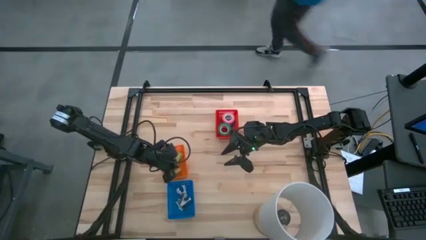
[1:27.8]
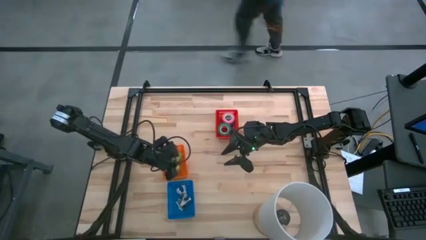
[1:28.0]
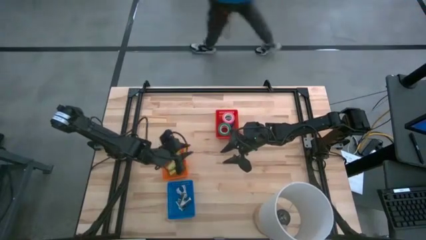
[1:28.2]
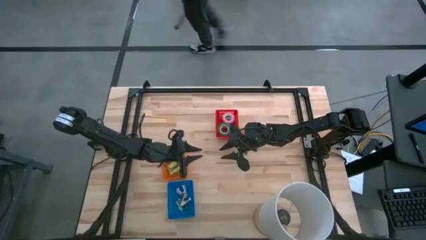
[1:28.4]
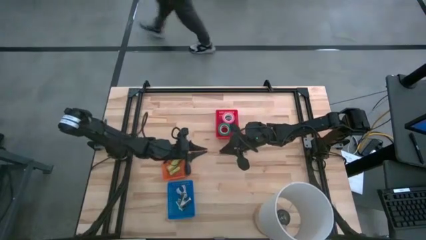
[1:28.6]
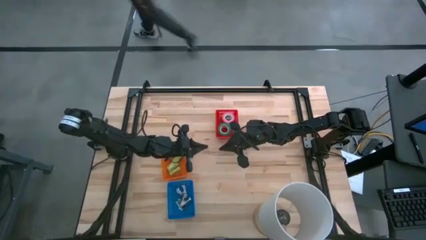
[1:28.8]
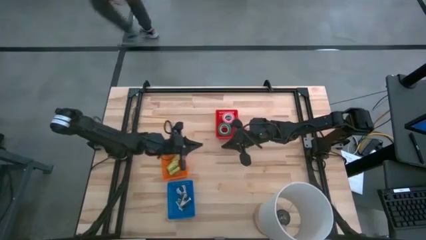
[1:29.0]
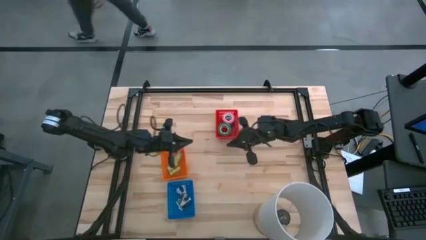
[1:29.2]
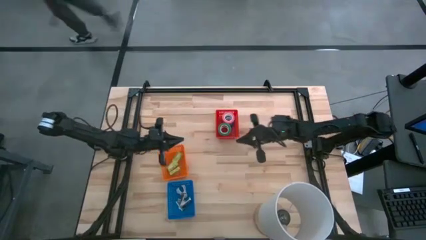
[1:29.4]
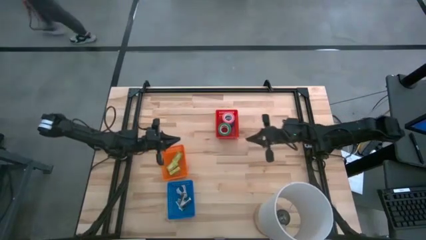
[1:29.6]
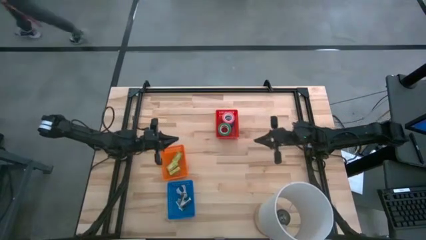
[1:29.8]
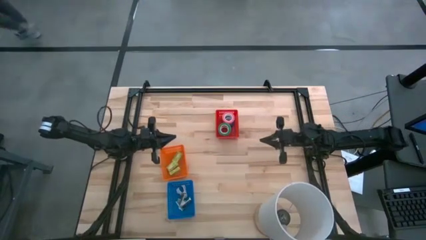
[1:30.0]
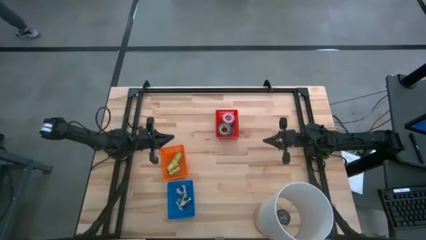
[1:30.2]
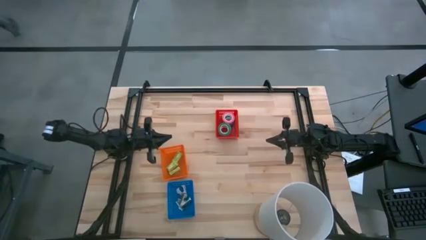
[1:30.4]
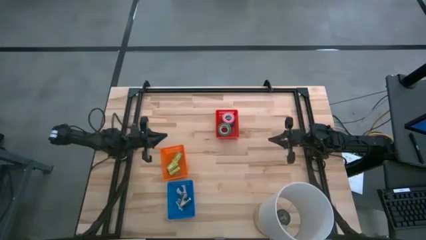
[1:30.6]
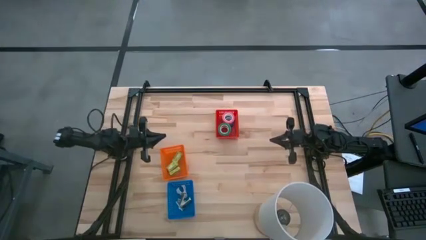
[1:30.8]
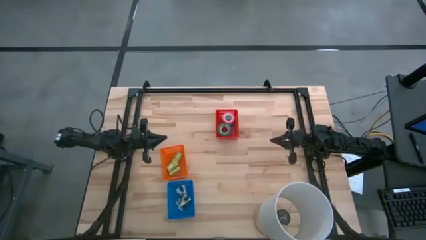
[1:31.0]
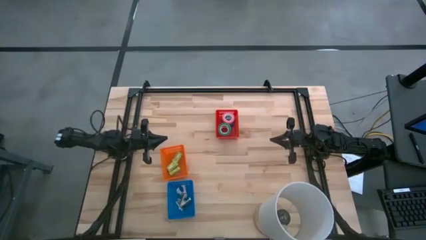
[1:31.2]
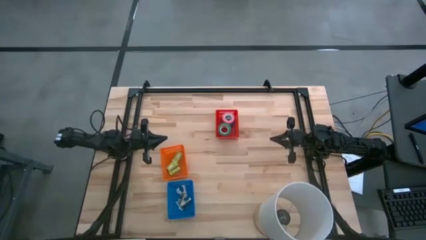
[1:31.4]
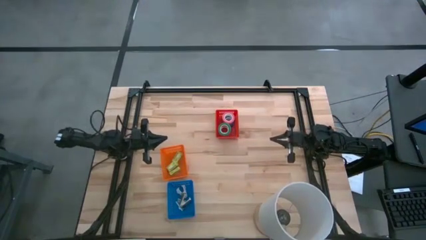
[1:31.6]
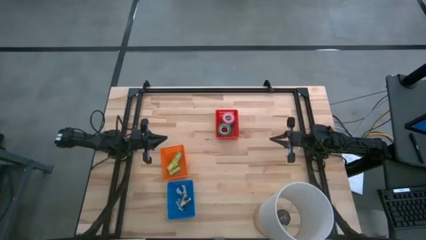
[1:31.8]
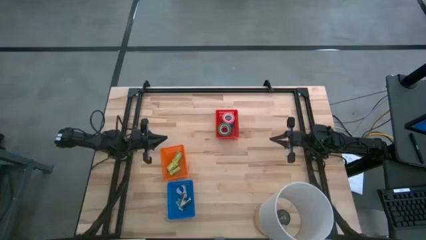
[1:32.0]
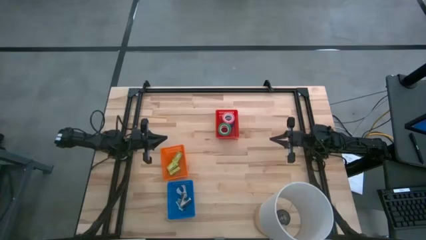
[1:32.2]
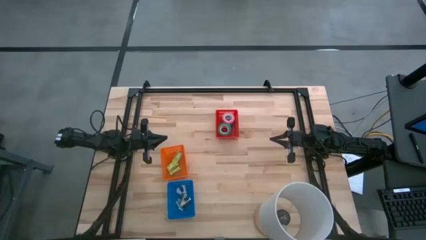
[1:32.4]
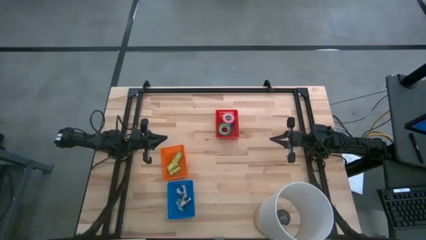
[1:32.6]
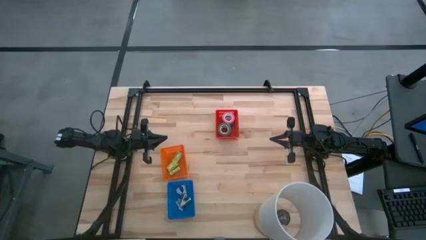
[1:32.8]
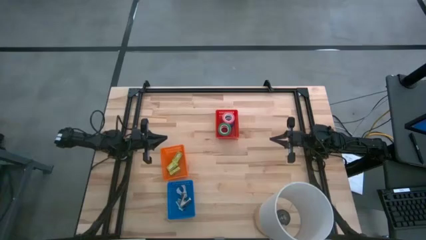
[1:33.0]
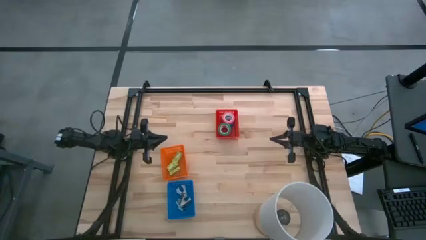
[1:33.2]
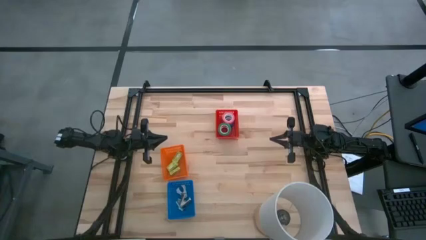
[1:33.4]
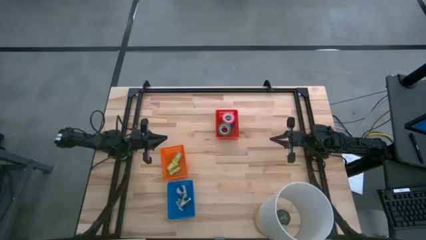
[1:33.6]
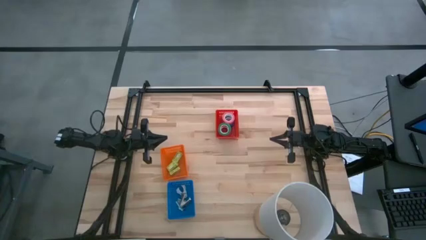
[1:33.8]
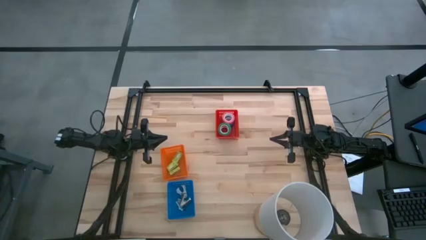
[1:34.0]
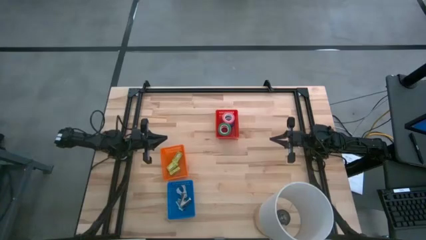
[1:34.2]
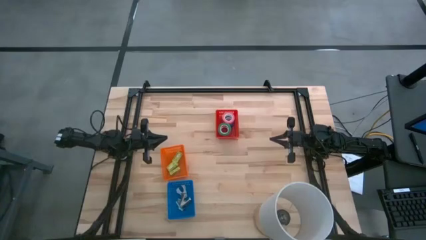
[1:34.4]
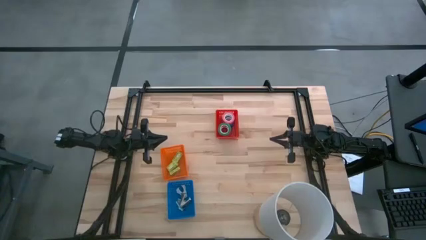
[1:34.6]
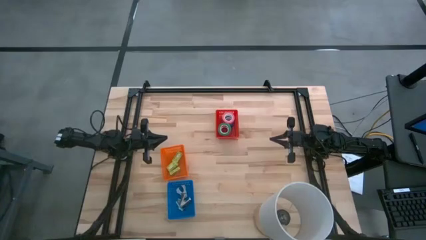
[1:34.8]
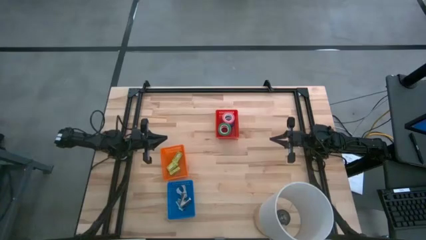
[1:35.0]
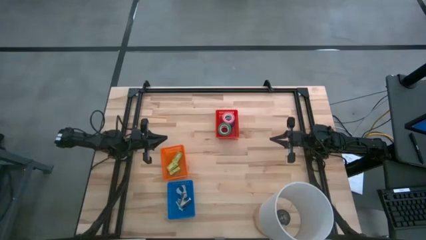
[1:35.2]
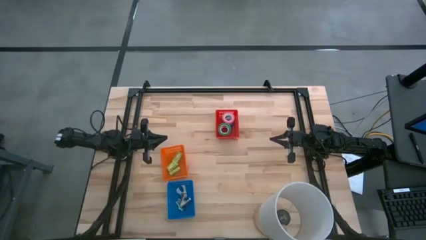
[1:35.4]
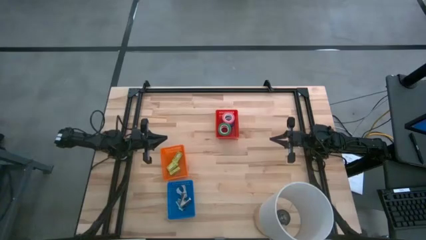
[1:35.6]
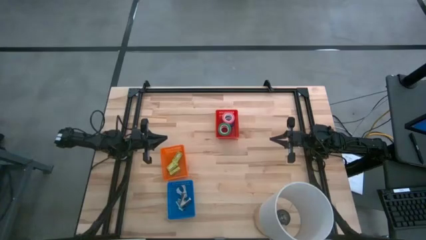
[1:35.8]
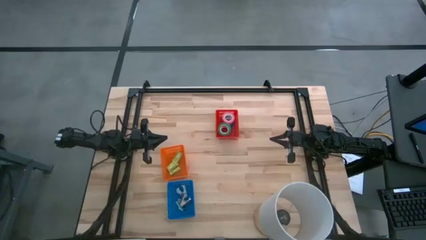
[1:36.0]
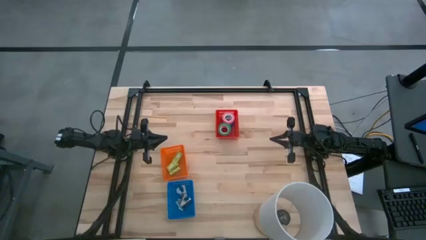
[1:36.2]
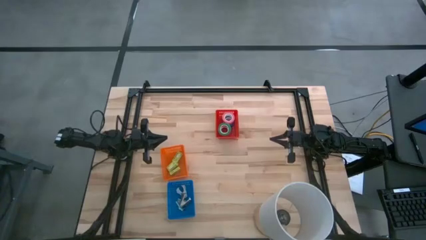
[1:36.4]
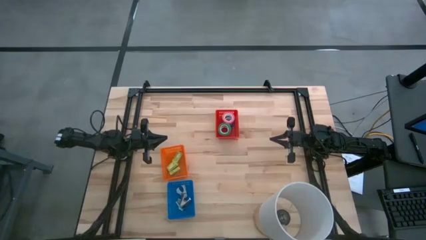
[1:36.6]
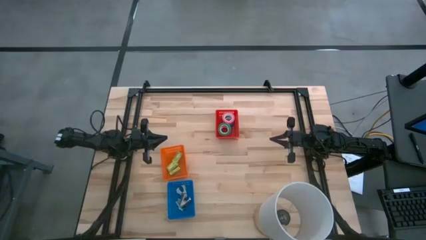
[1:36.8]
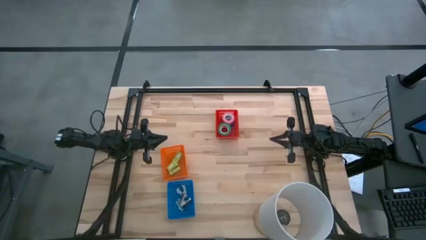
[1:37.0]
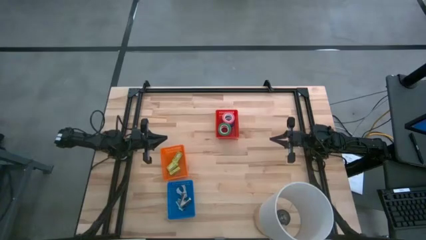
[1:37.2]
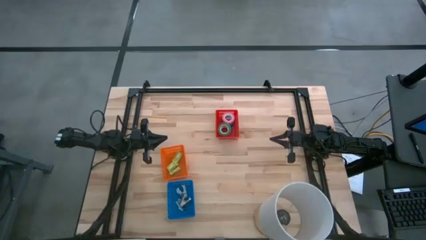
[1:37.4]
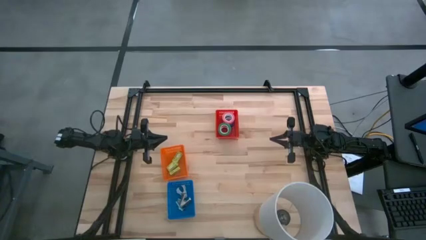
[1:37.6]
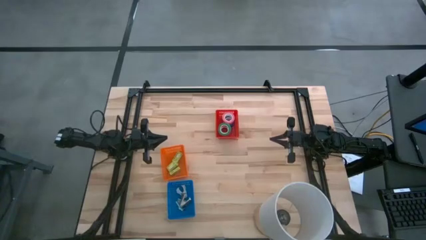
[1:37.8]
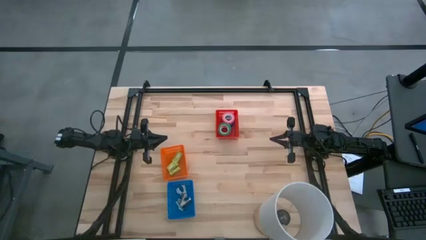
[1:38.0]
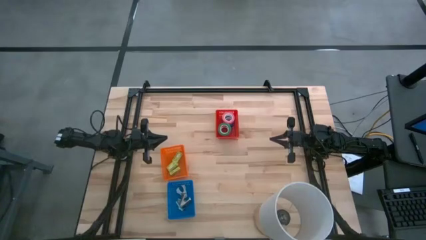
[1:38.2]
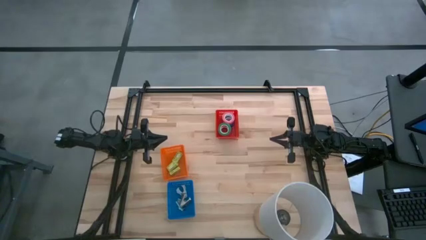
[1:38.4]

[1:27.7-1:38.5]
Task: Pick and place Stapler, Stapler remover, tape
Return to Home Position

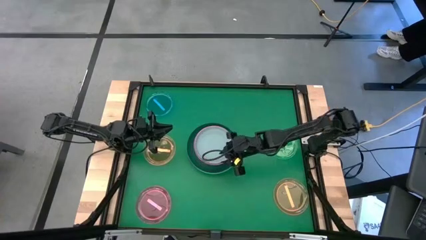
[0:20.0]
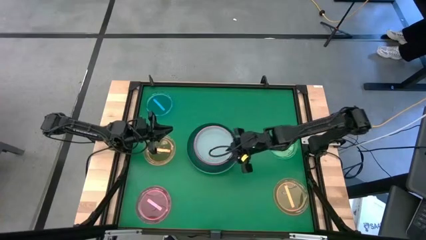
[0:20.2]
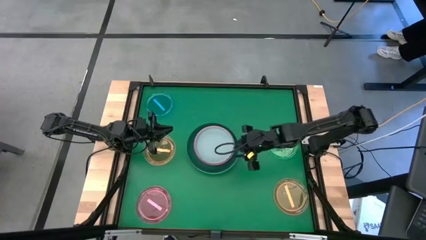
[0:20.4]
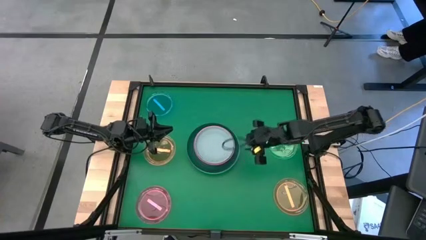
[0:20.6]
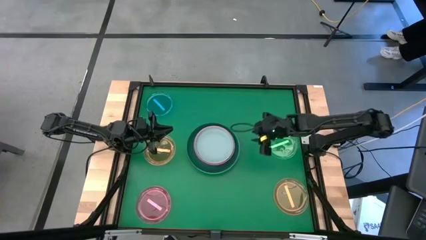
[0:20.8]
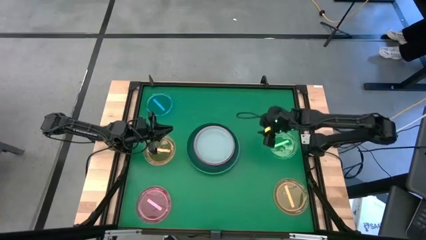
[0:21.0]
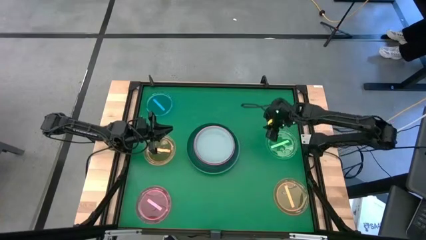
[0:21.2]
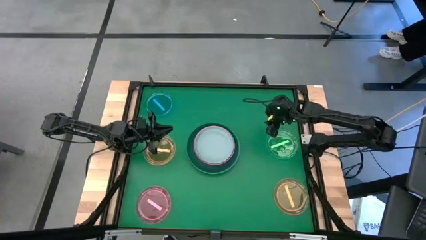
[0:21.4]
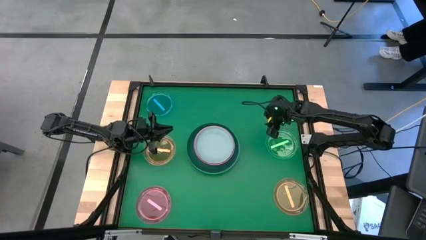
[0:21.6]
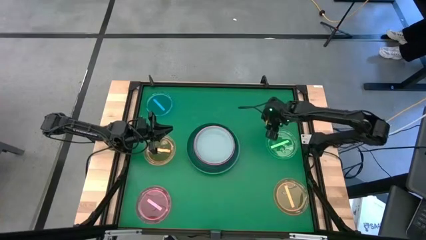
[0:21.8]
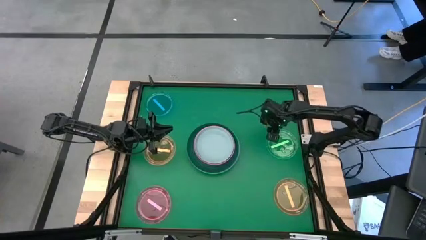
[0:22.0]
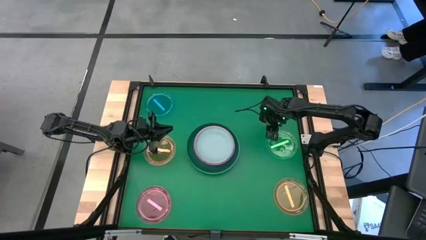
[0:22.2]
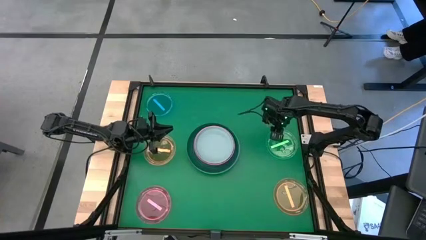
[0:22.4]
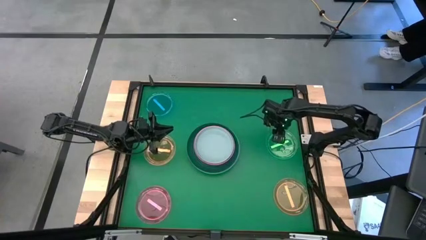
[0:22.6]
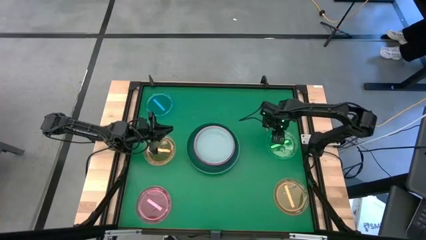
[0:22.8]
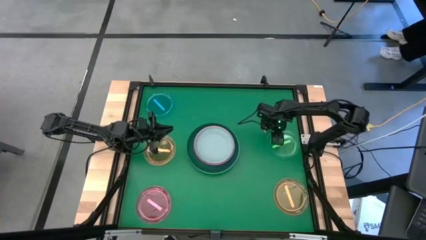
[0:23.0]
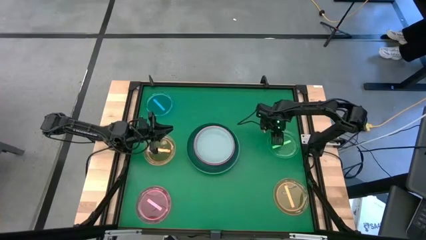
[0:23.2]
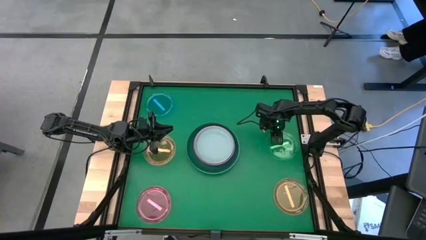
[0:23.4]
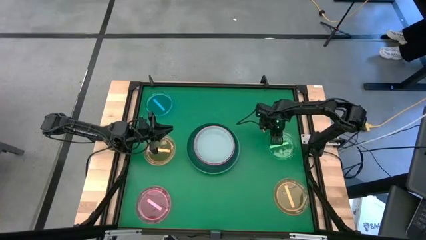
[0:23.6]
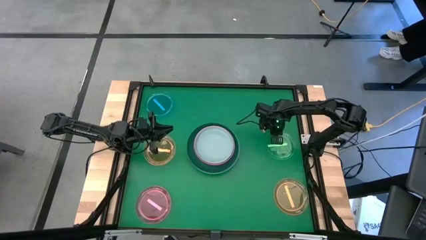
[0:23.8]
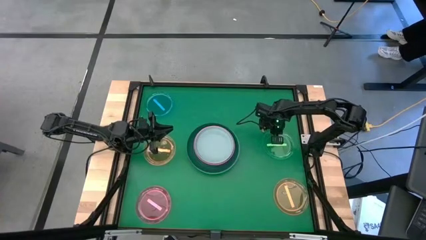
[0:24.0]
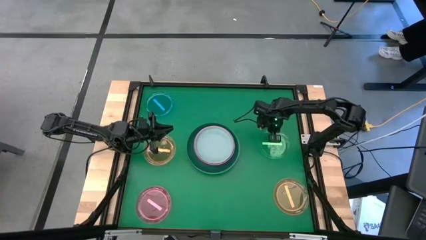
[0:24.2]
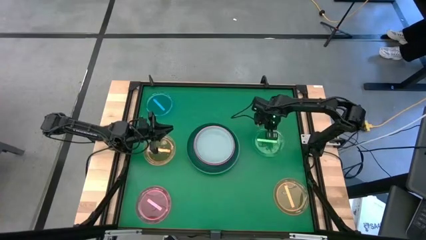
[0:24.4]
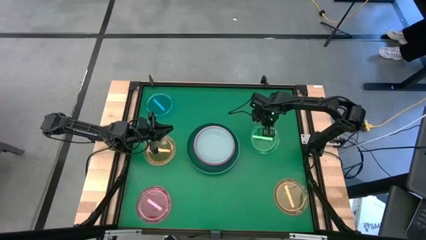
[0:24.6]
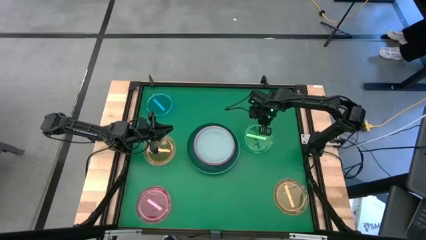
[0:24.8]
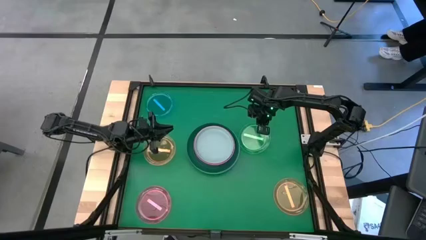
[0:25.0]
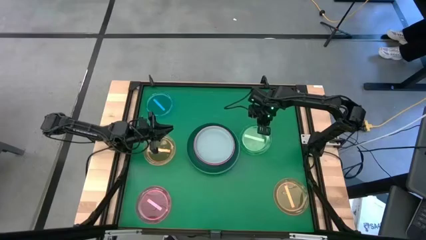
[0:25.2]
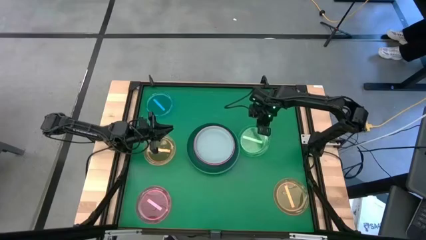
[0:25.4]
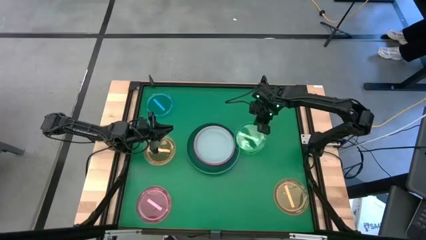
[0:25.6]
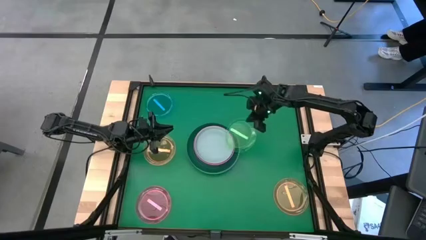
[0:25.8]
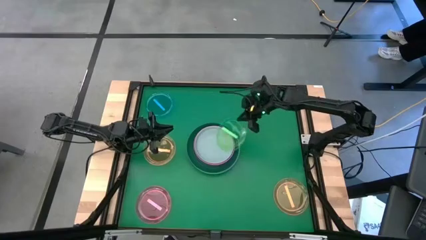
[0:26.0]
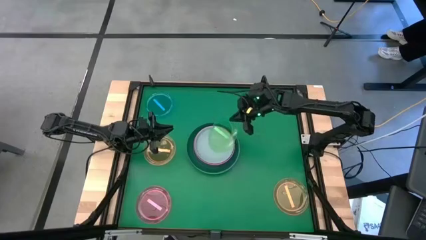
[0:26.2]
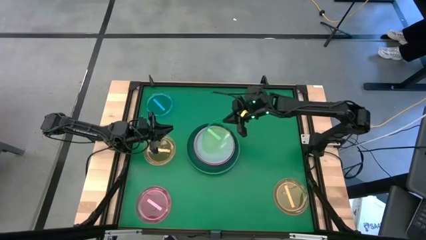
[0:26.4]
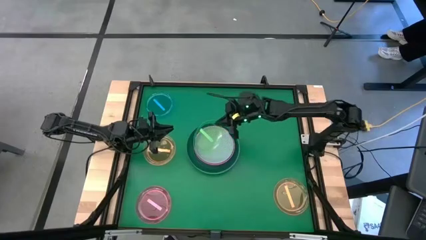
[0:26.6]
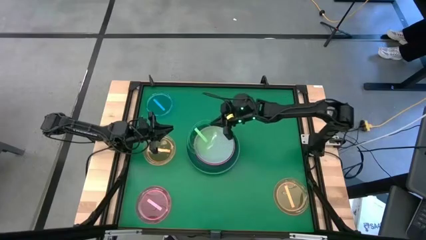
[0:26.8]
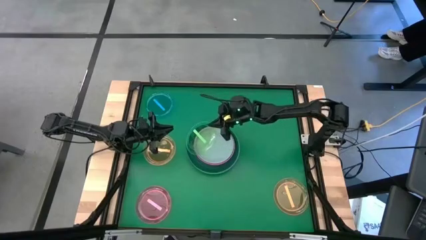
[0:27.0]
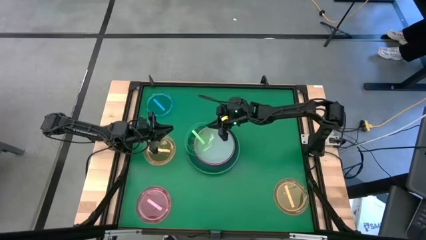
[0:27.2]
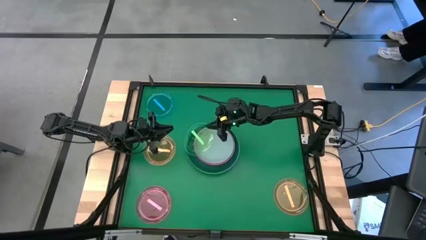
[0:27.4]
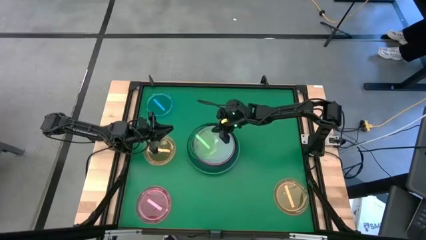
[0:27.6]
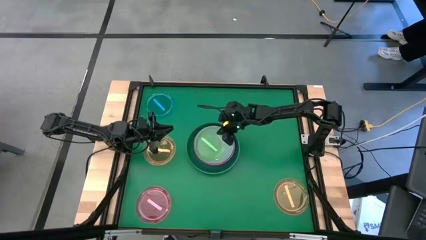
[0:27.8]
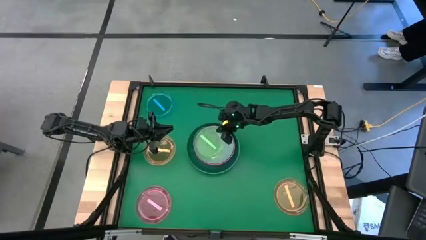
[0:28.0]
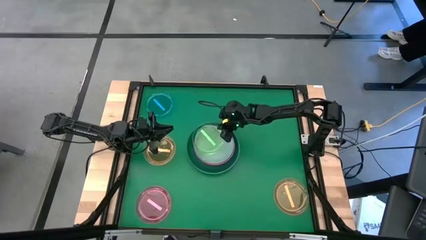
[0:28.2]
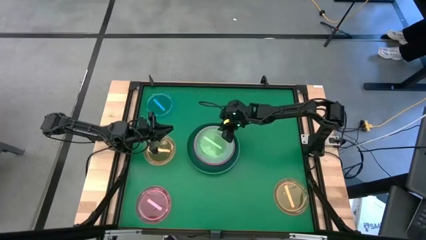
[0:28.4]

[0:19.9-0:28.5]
Task: Stack plastic plates
Stack the transparent green plate on top of the small gray plate
